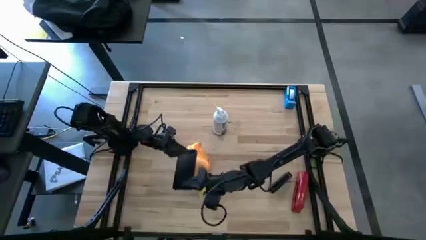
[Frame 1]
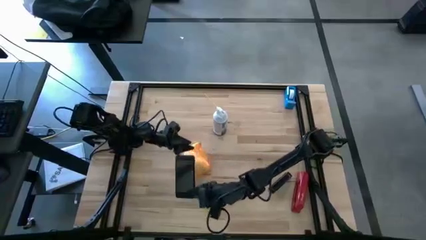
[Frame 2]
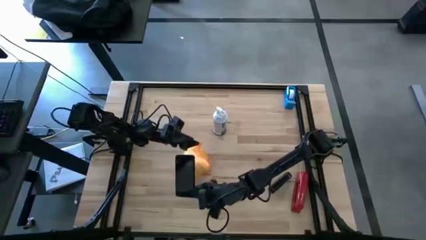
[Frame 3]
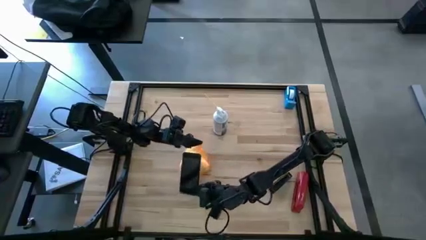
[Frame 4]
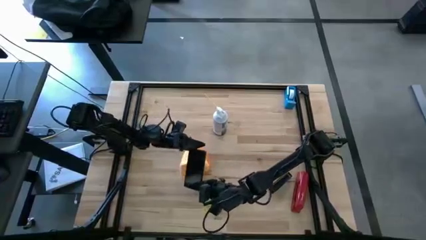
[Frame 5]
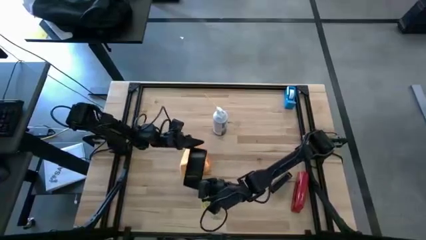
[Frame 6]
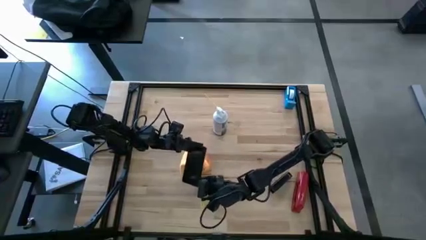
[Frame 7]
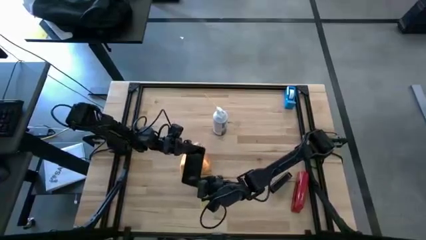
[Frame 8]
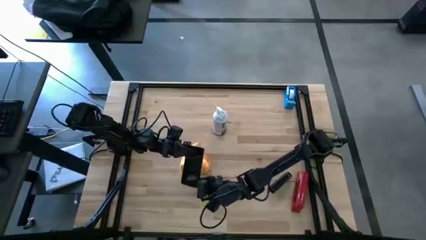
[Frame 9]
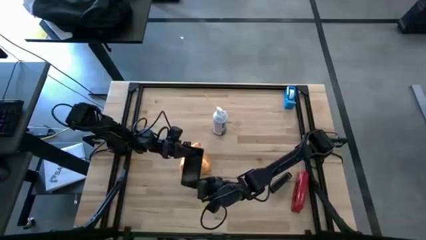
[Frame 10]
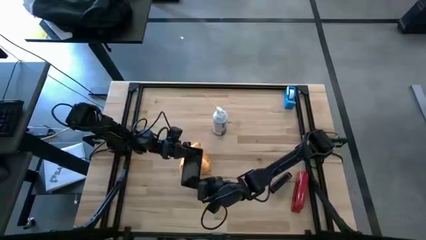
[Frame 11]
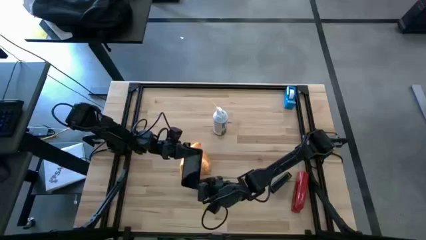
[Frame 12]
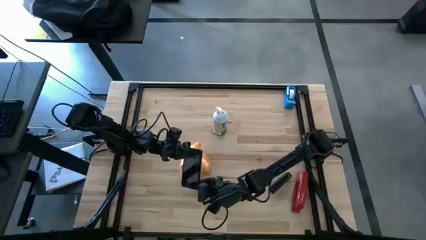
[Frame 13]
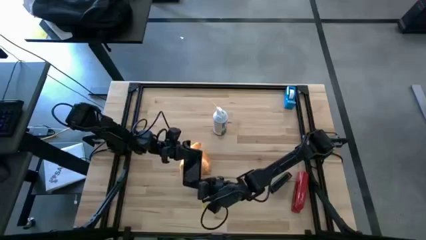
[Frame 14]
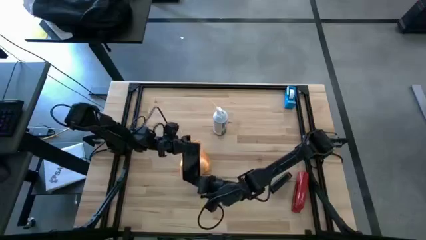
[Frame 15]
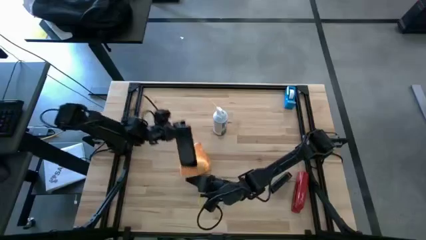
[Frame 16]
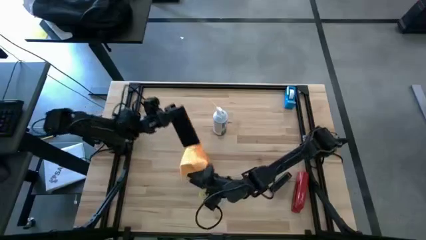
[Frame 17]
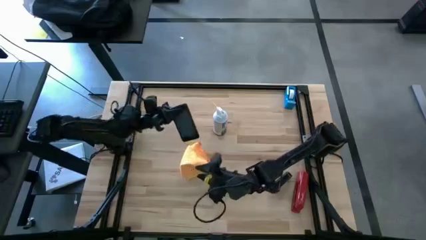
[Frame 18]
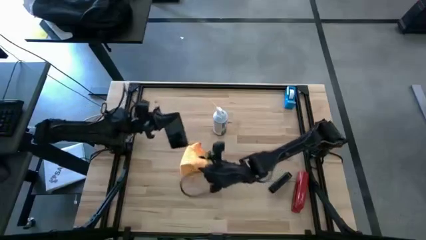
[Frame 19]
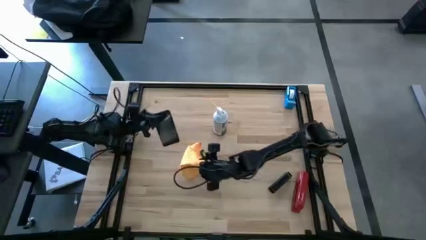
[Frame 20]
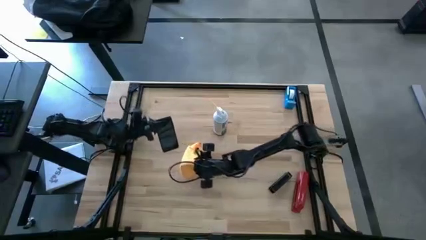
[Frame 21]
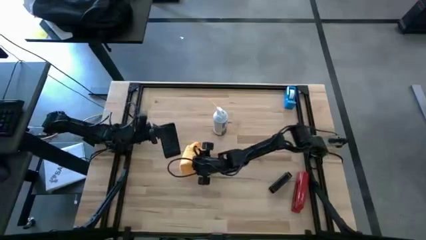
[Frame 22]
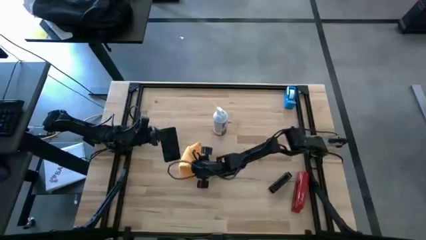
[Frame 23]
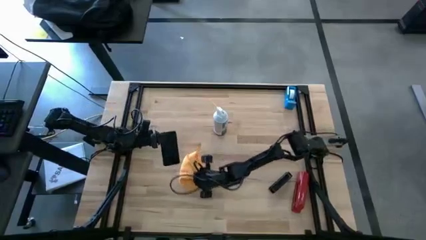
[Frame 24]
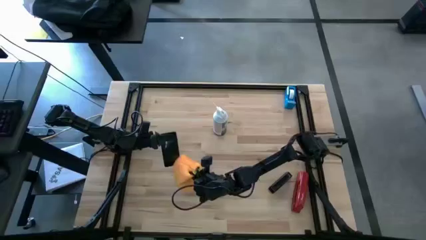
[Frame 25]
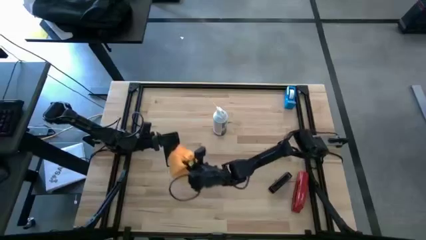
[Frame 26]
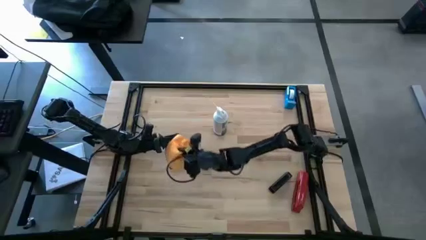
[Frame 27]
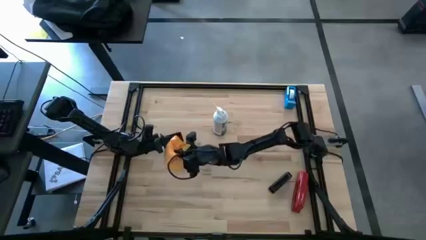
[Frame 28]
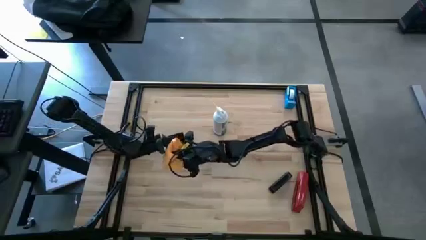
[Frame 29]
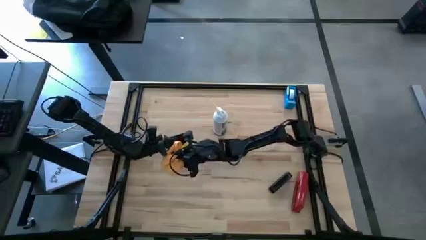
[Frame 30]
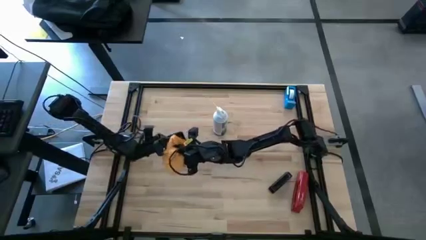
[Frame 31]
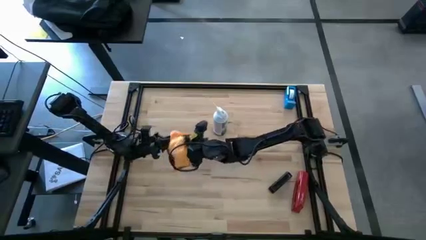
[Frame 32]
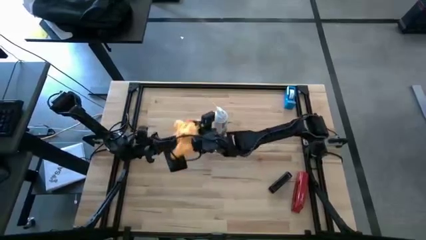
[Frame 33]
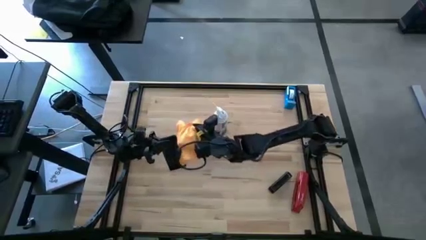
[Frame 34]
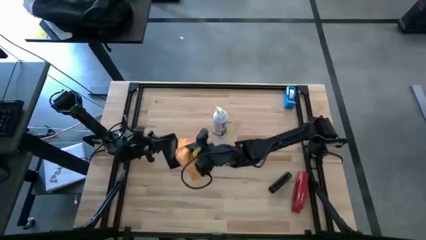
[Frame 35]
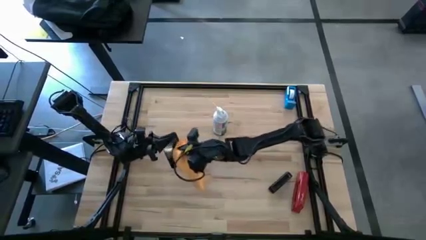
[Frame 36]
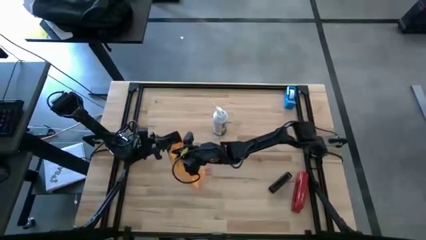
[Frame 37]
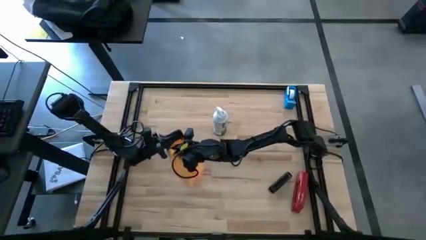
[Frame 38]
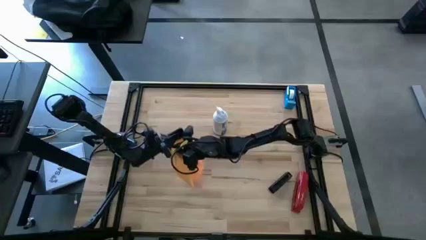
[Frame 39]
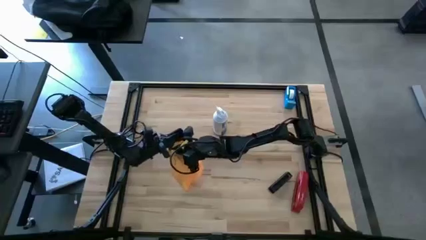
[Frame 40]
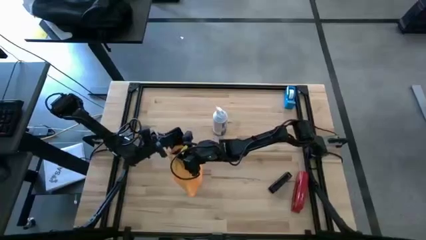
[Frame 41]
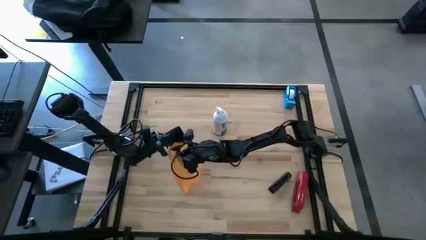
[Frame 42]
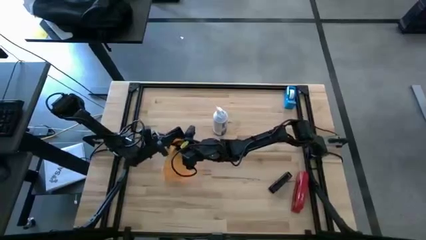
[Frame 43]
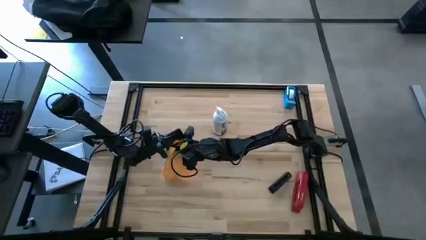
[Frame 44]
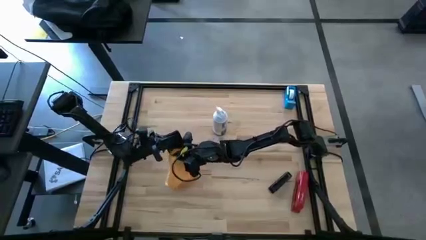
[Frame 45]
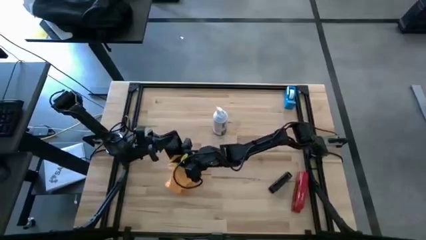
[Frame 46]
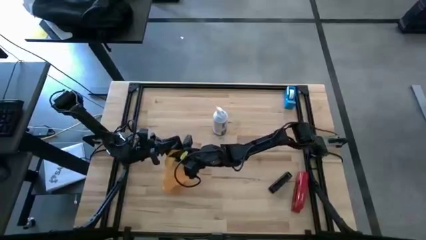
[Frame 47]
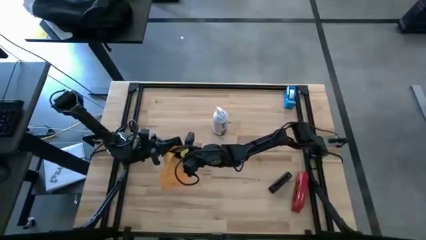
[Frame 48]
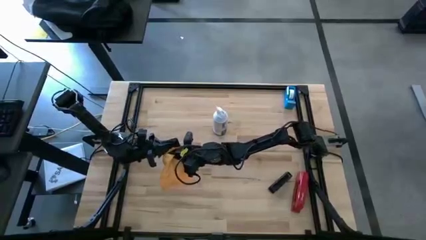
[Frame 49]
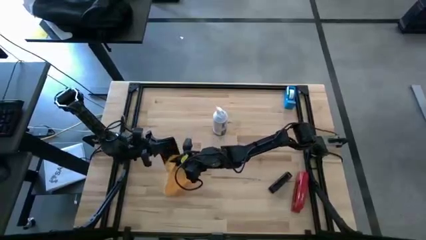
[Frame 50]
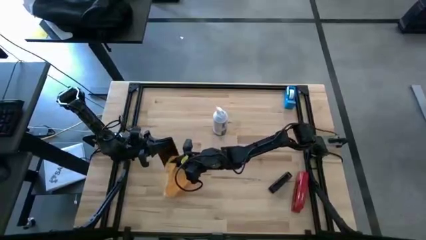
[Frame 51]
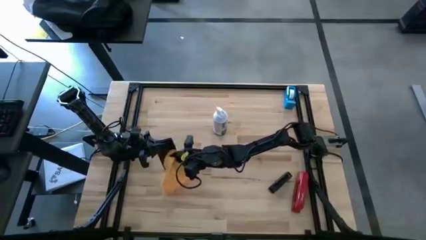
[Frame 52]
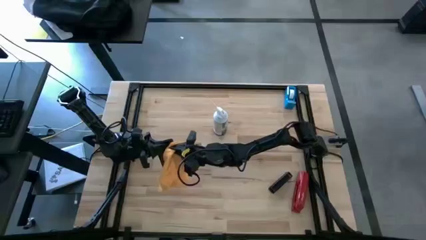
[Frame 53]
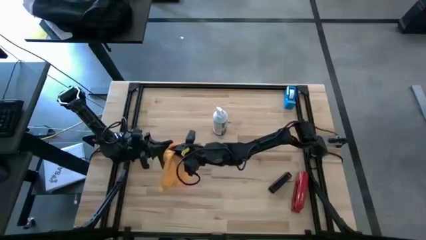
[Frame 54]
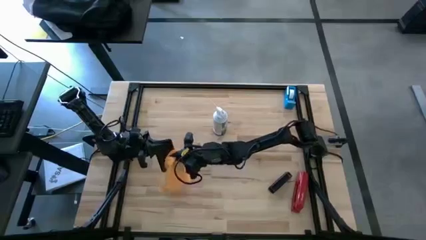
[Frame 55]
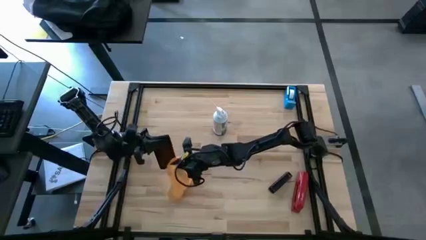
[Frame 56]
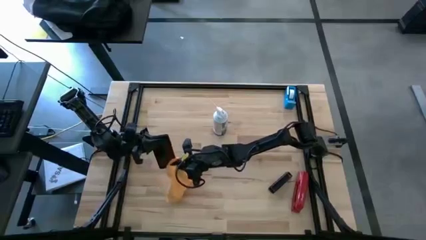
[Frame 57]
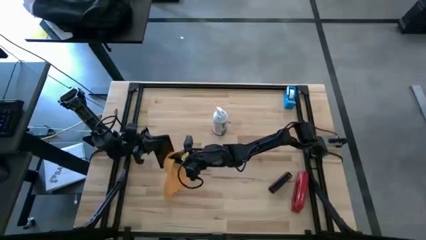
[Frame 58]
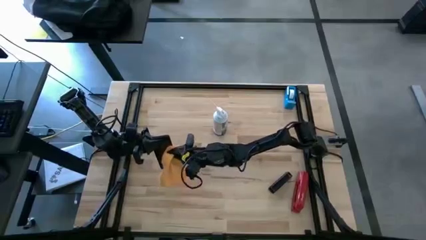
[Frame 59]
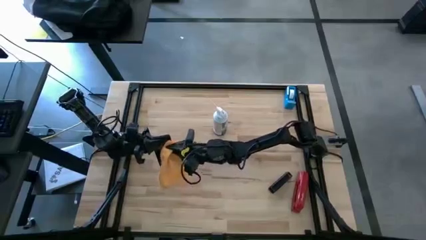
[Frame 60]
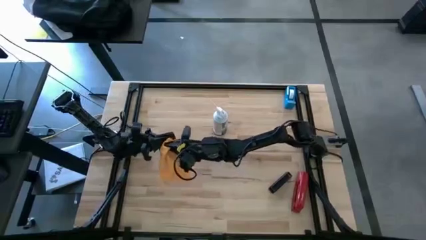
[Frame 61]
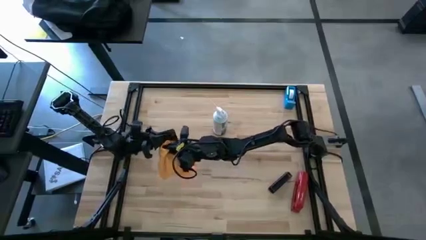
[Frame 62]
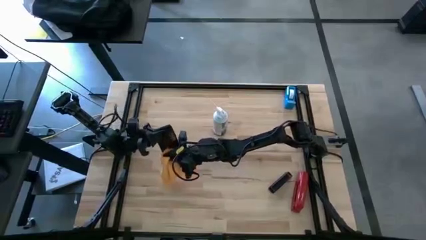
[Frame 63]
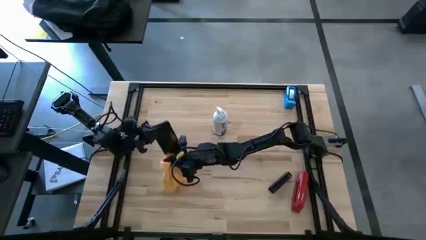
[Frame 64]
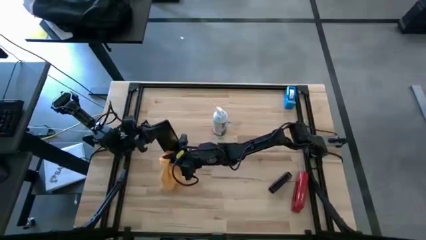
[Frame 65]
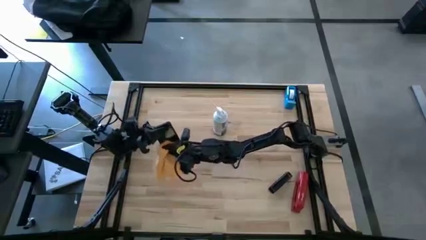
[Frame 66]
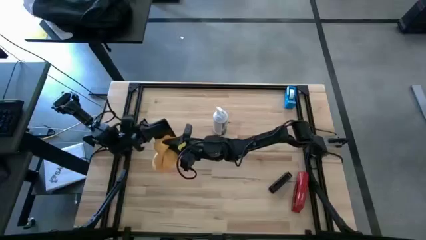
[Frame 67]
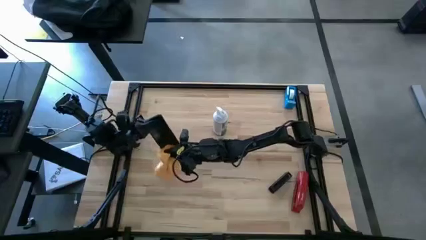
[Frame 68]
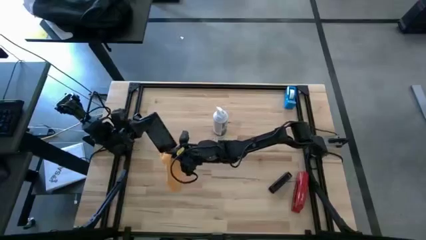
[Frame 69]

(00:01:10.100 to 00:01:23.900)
Task: Apply microfiber cloth
Wipe the front of the cellphone with the yellow microfiber cloth
